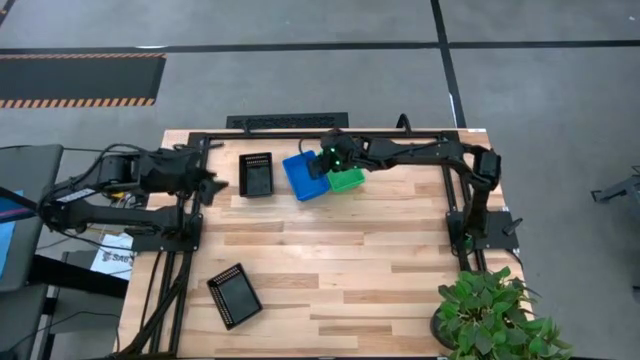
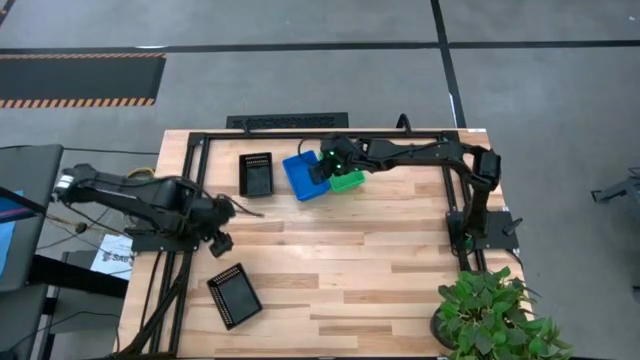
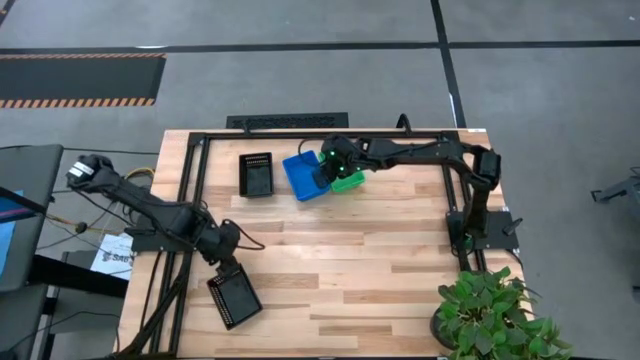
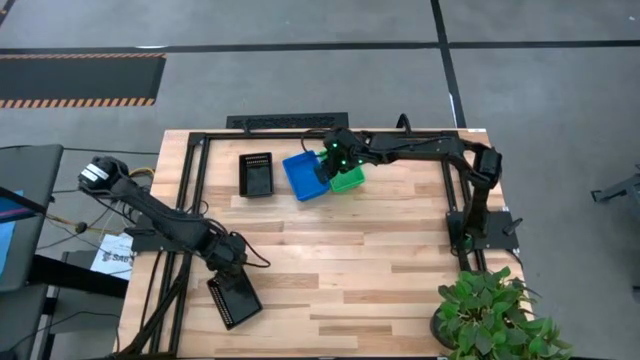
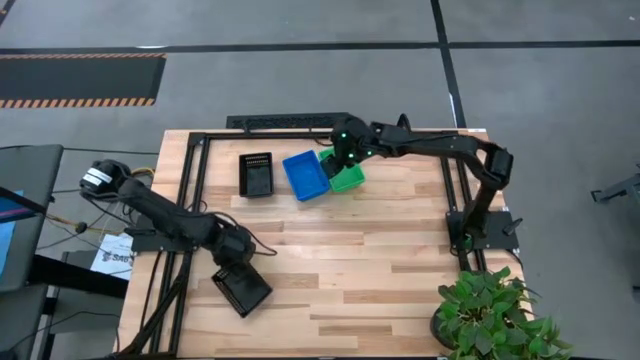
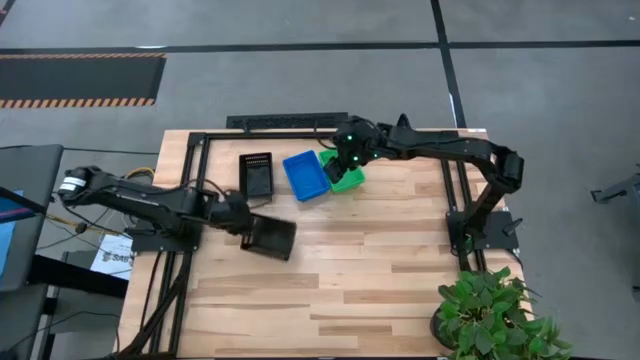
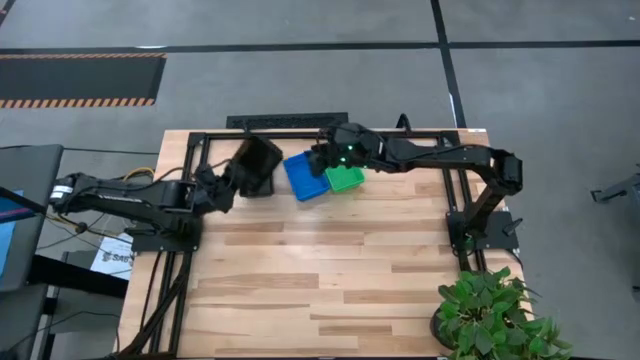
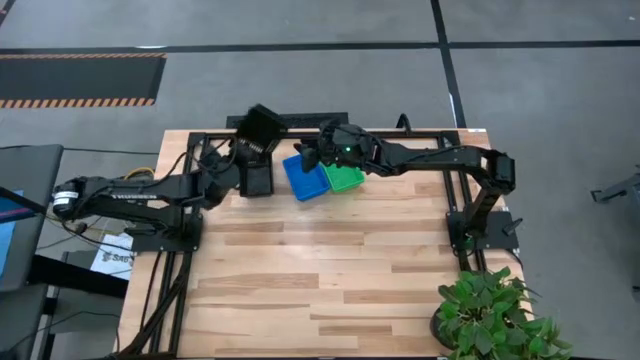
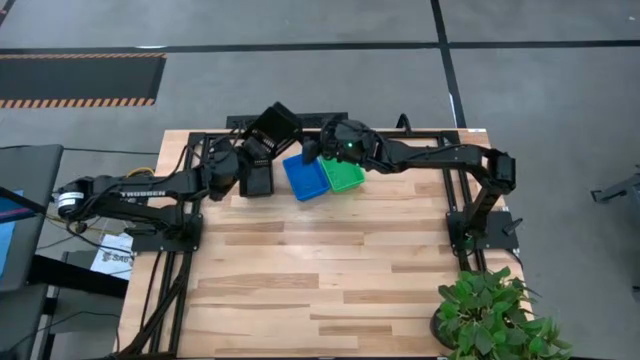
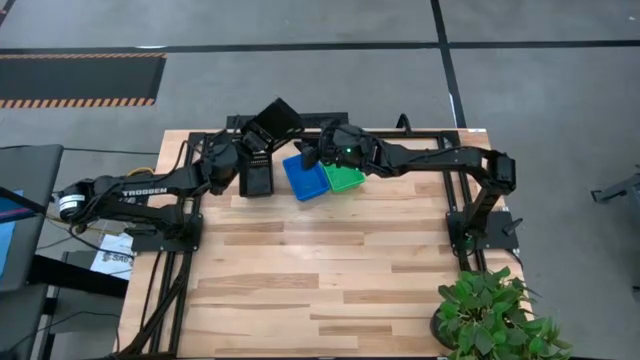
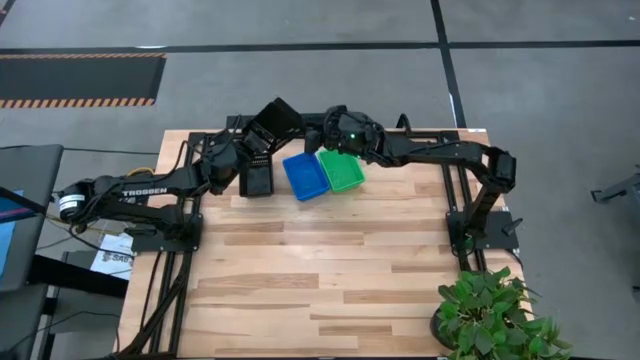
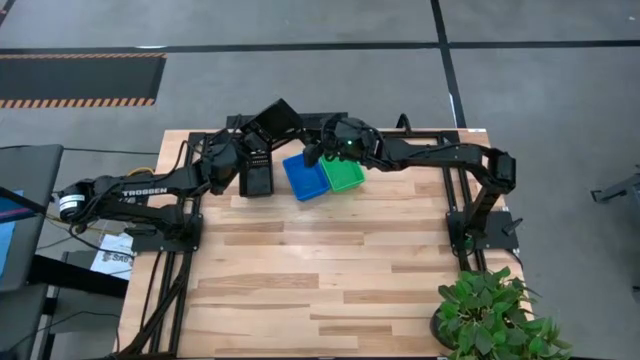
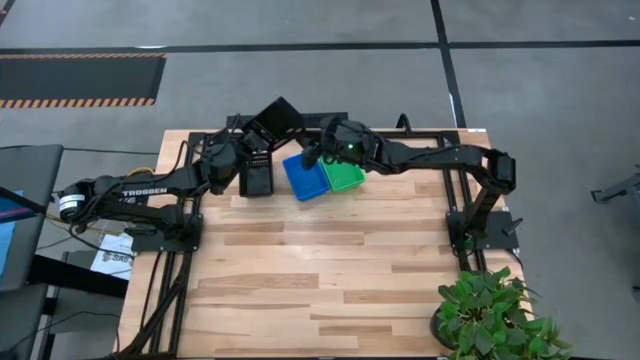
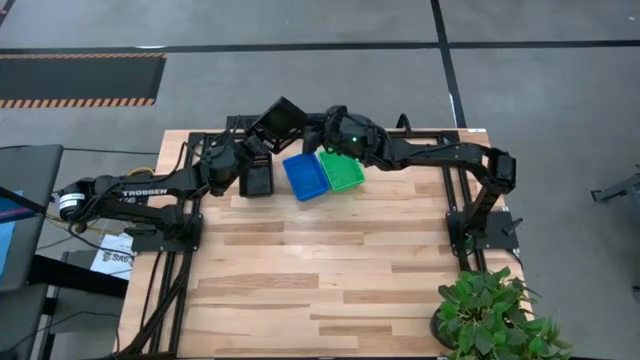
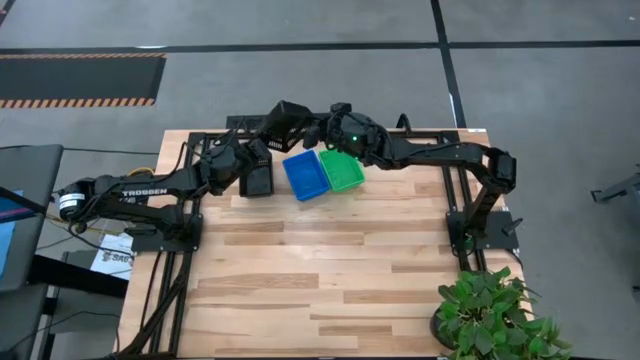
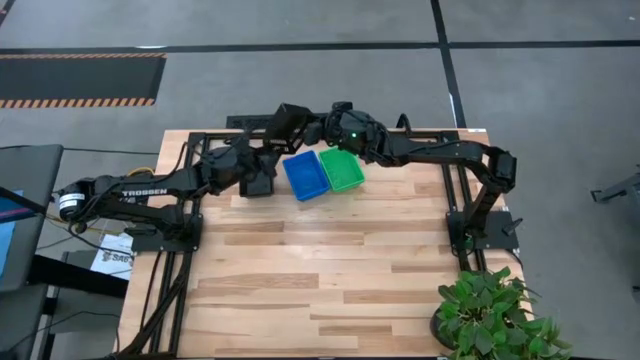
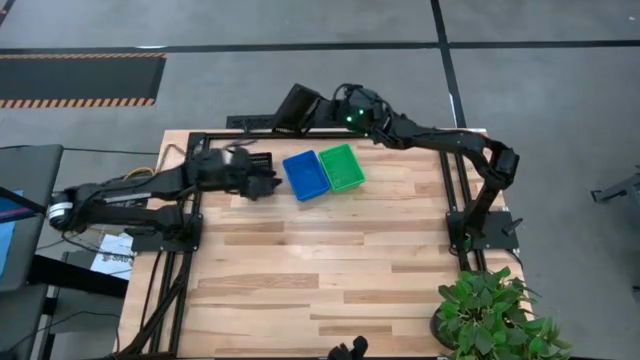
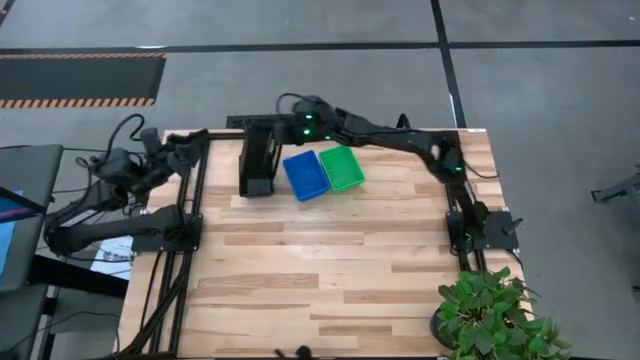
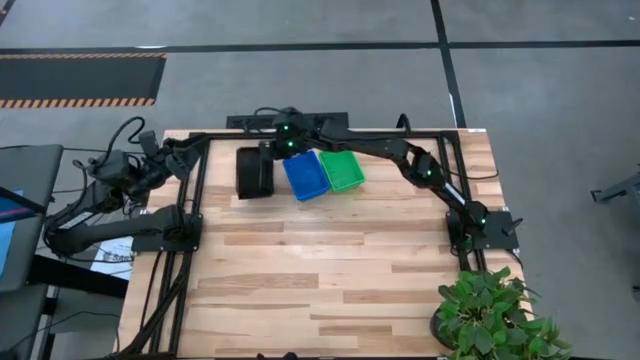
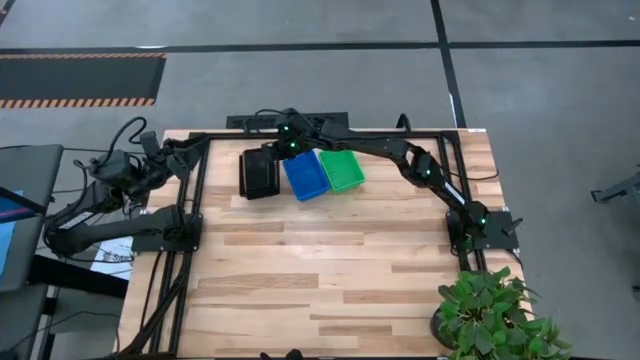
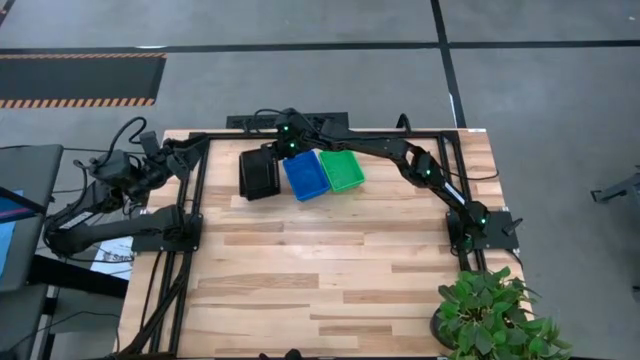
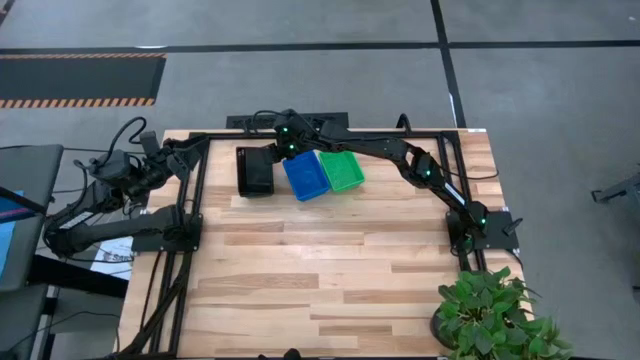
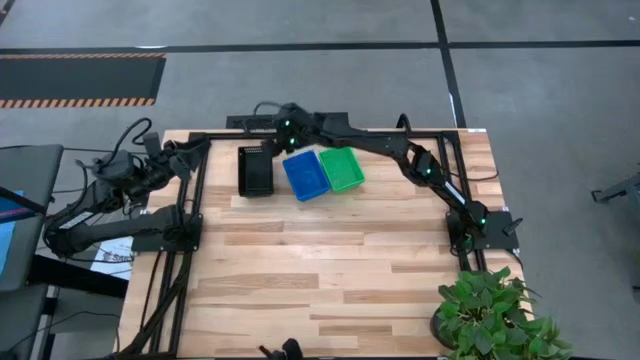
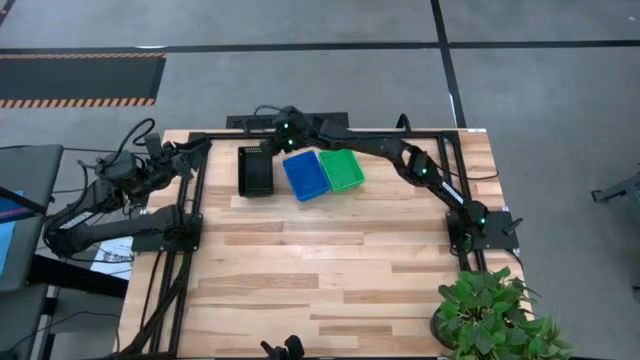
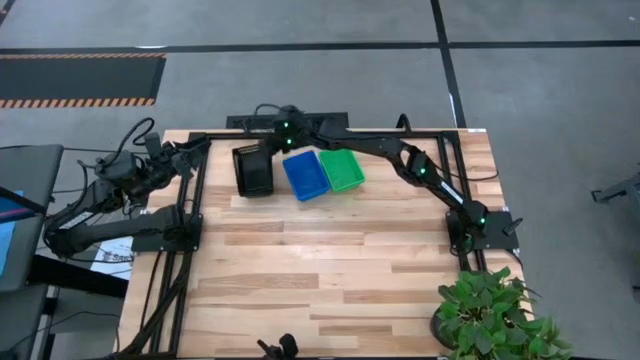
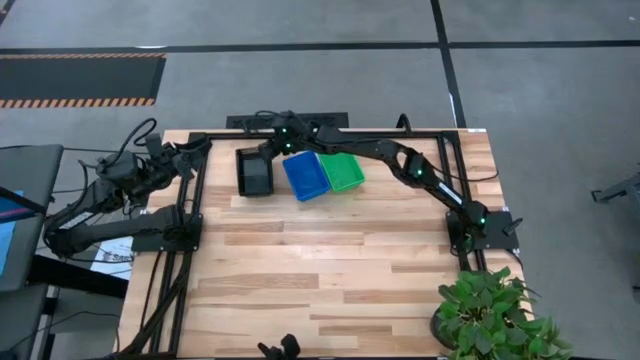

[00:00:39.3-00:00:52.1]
Stack the bottom black bin on top of the top black bins

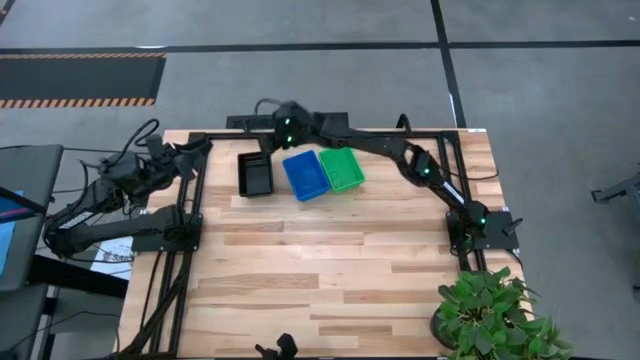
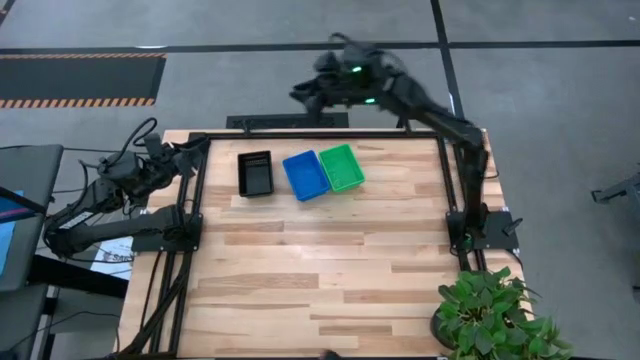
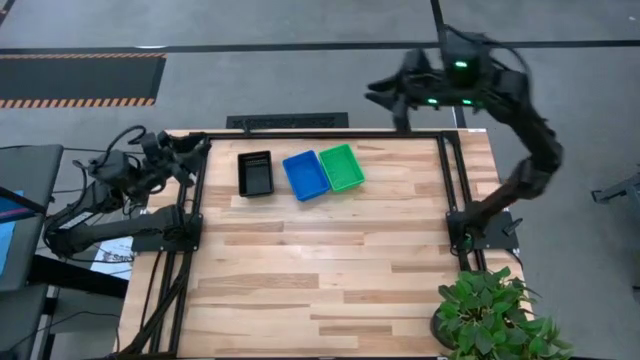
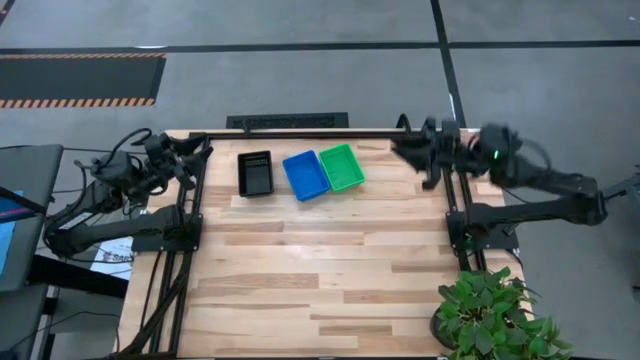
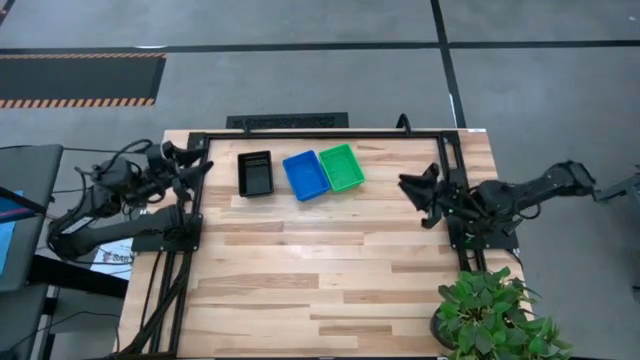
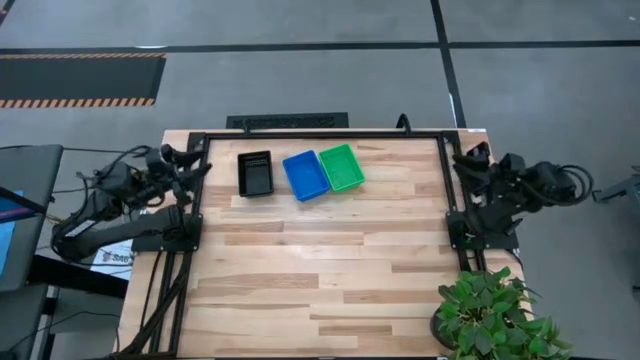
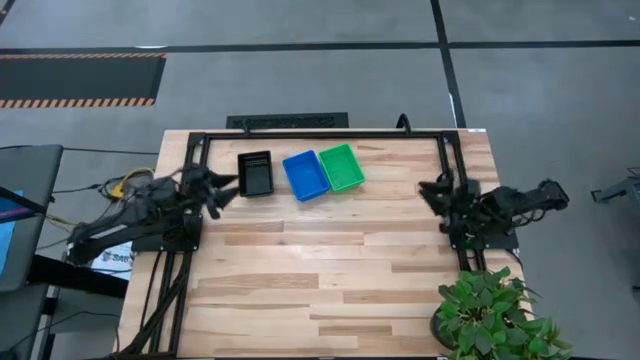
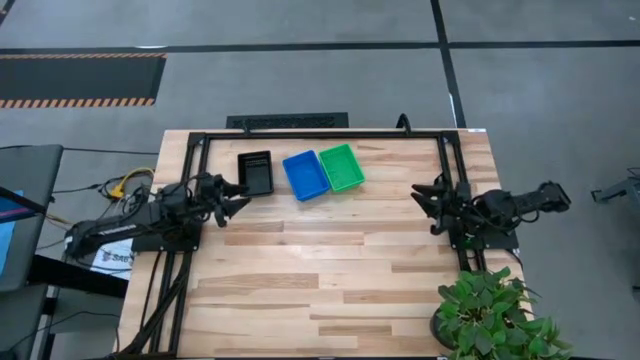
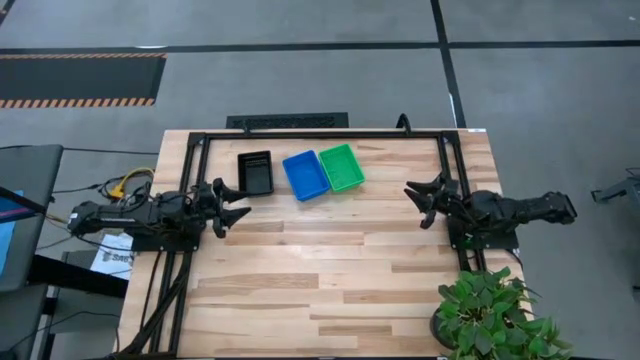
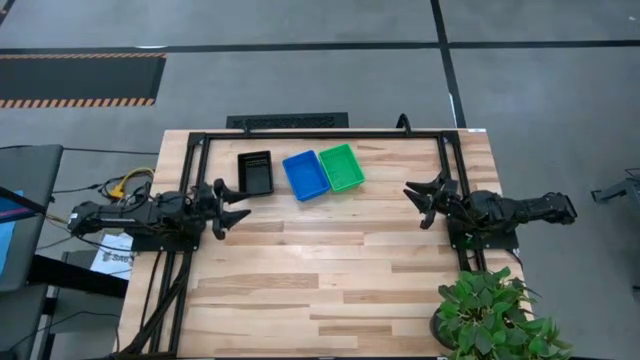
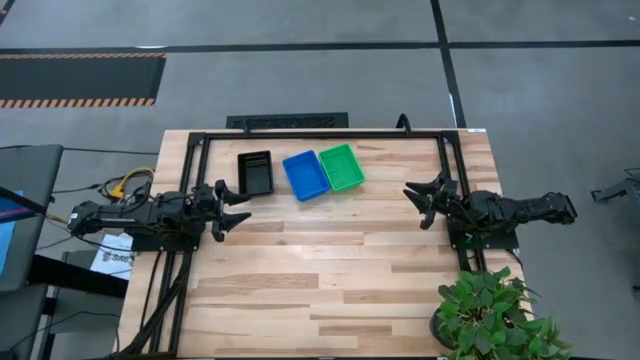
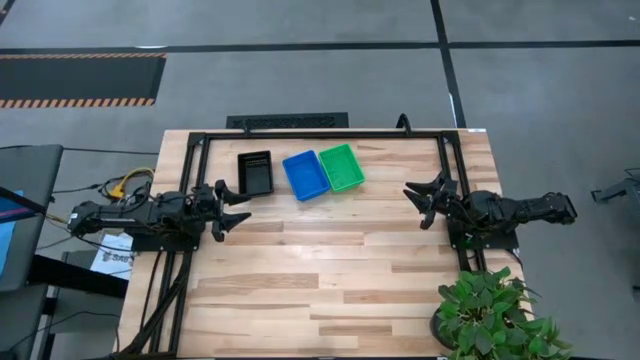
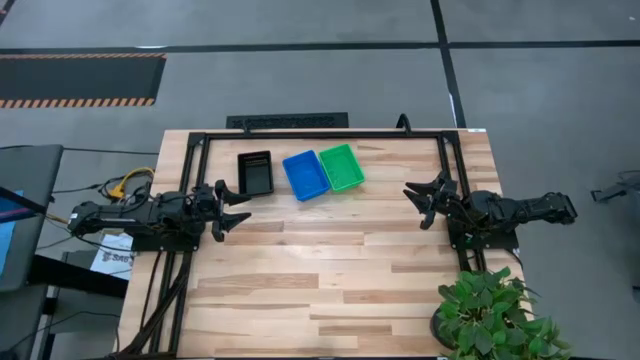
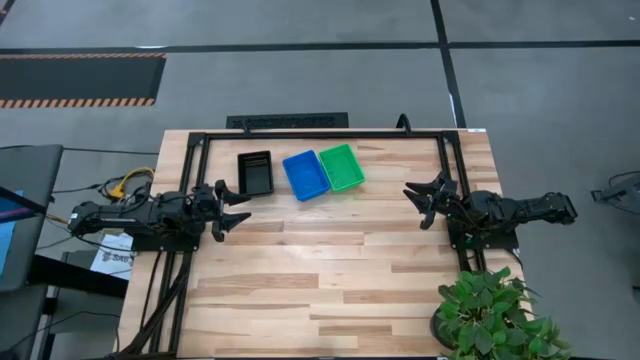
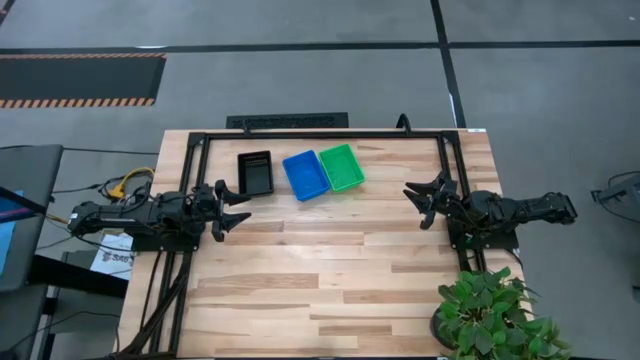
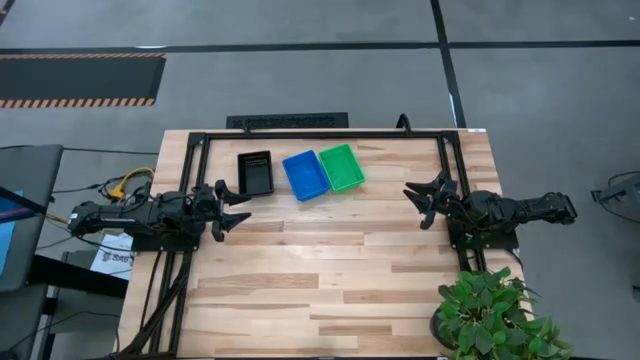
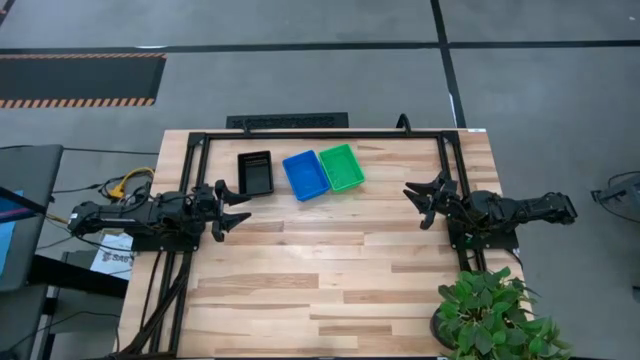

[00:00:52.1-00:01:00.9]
Return to Home Position
